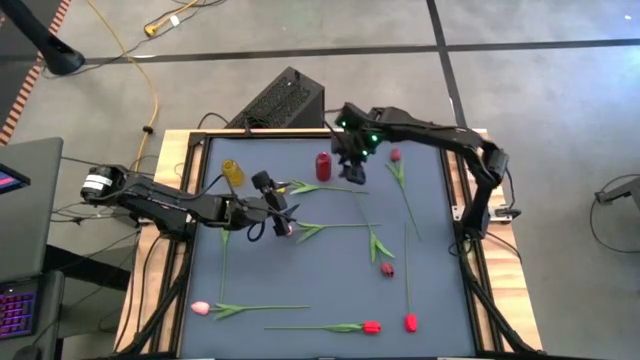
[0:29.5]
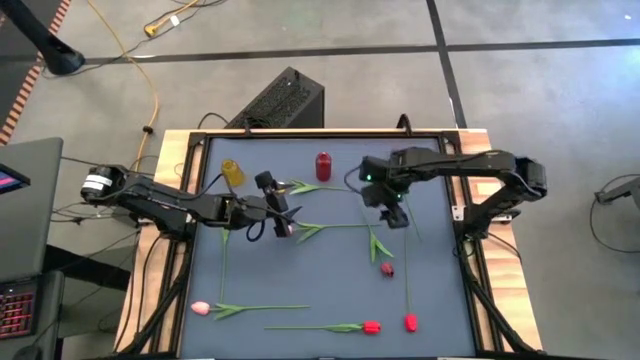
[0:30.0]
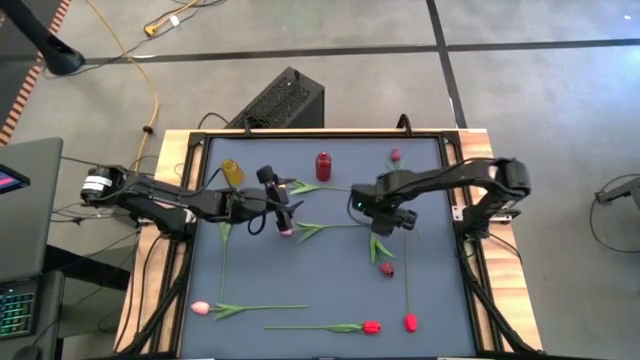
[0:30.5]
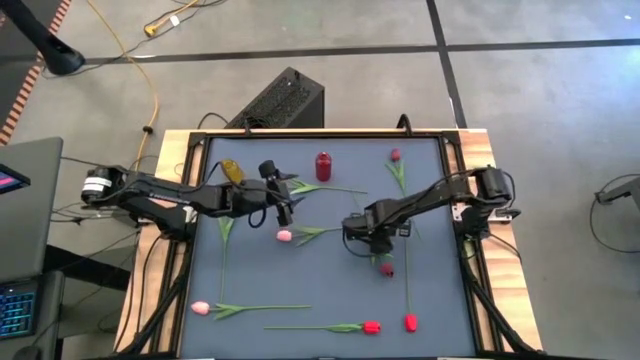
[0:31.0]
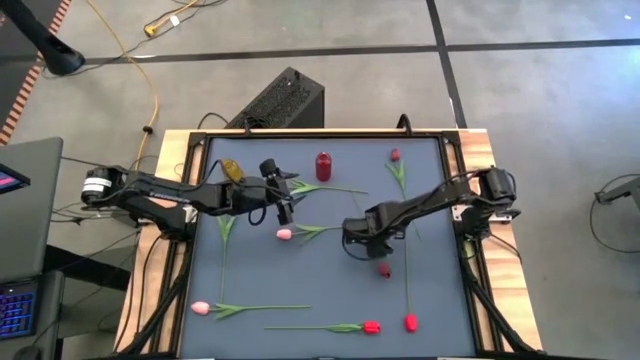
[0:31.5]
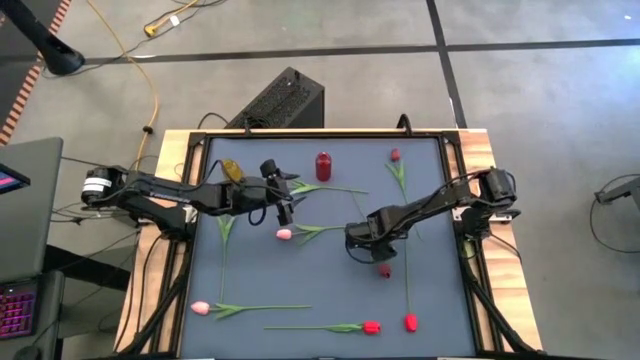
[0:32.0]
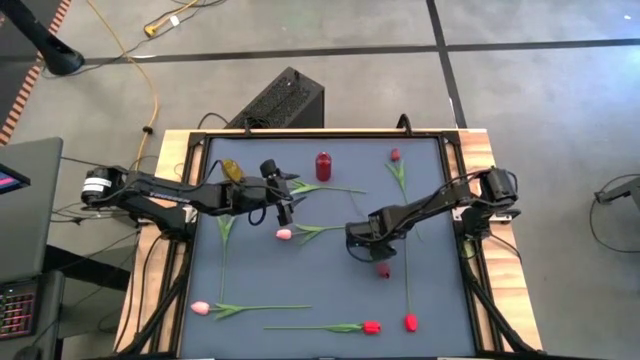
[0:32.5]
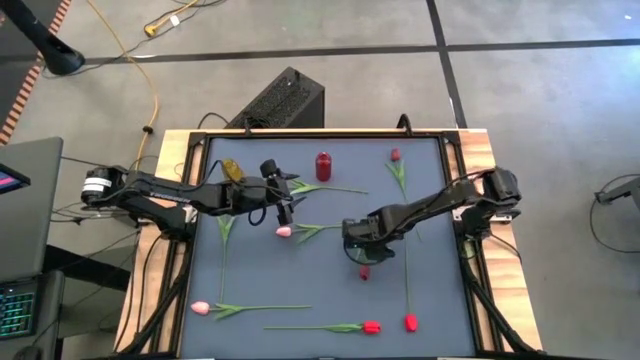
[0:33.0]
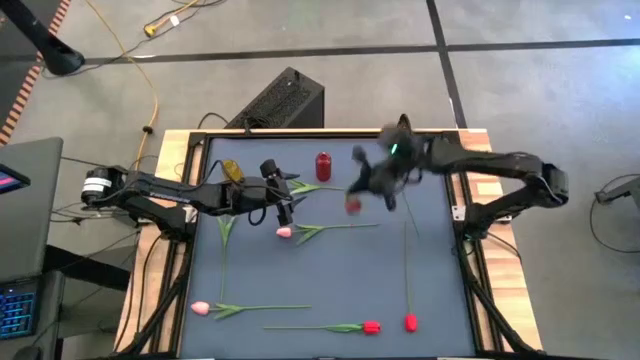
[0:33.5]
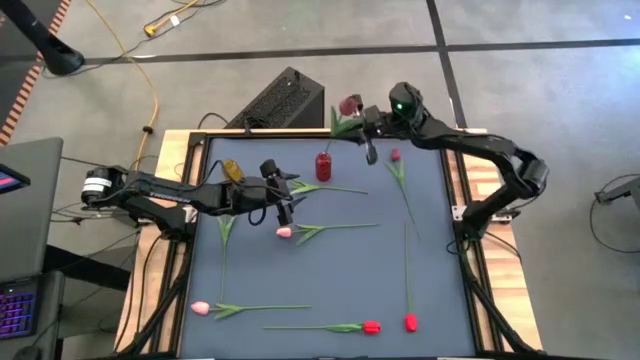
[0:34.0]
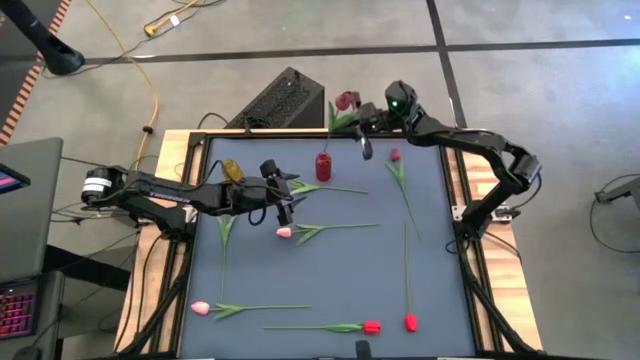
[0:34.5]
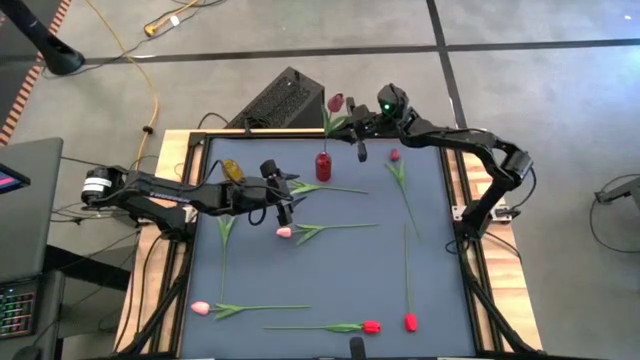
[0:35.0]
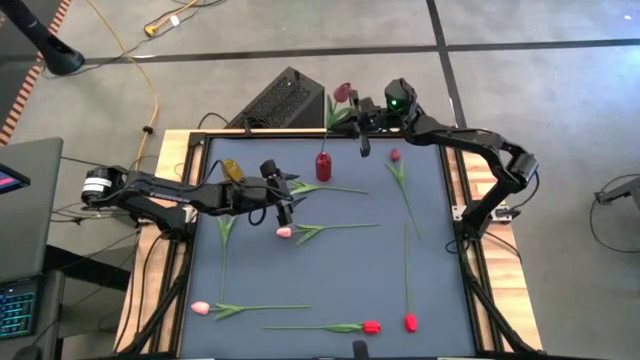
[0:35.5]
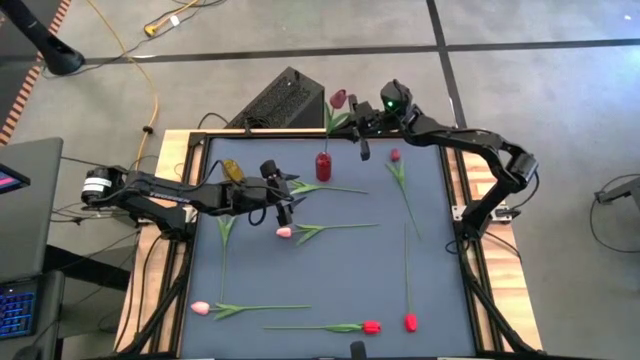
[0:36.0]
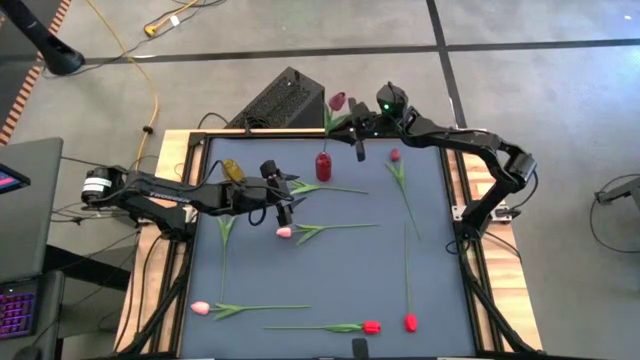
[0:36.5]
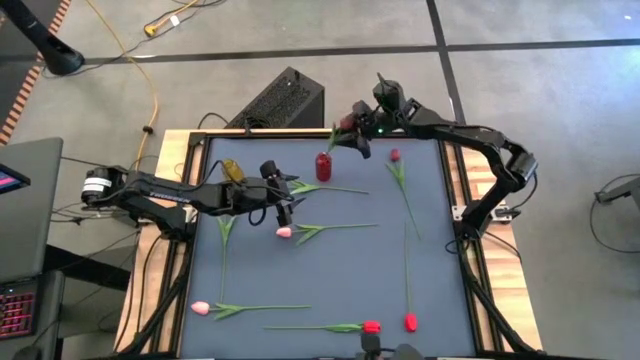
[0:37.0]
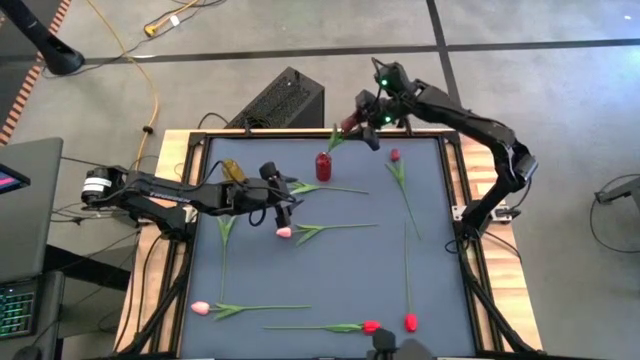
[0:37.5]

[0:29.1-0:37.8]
Task: Sort flowers into vase by color
Put the bottom dark red flower into the red flower vase

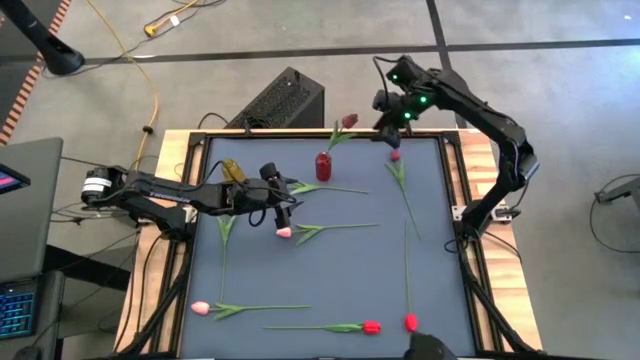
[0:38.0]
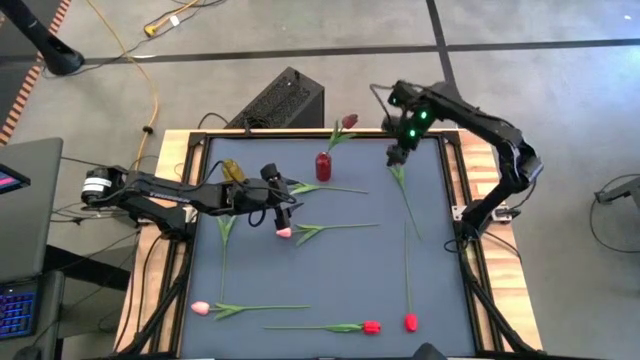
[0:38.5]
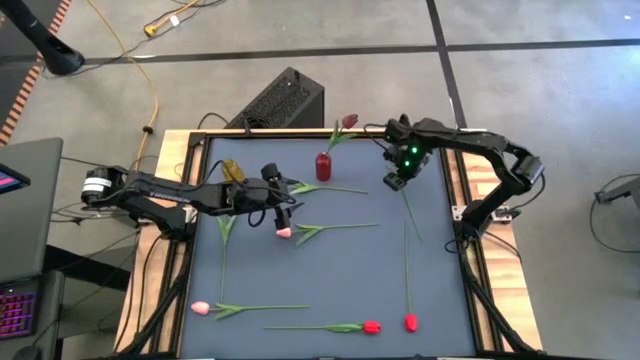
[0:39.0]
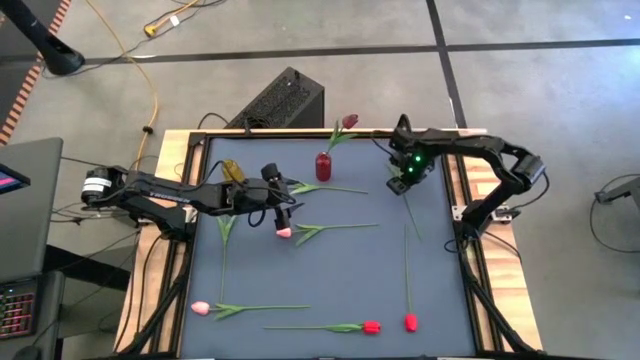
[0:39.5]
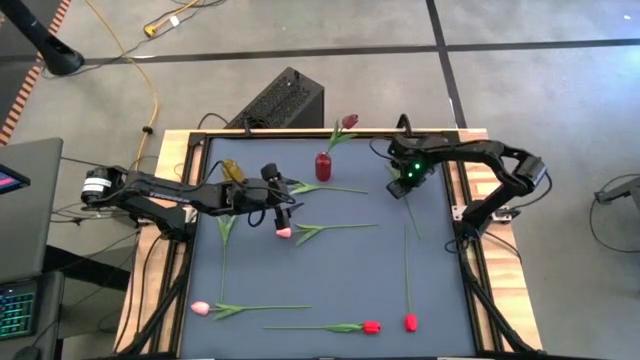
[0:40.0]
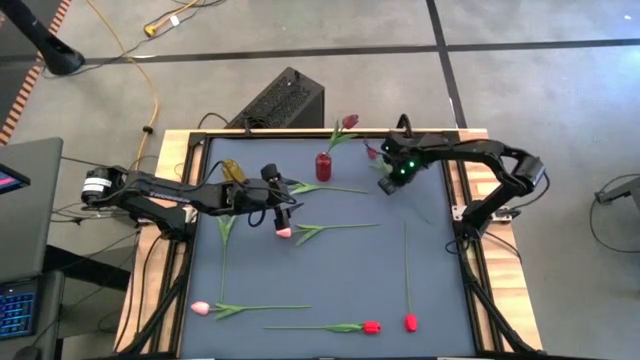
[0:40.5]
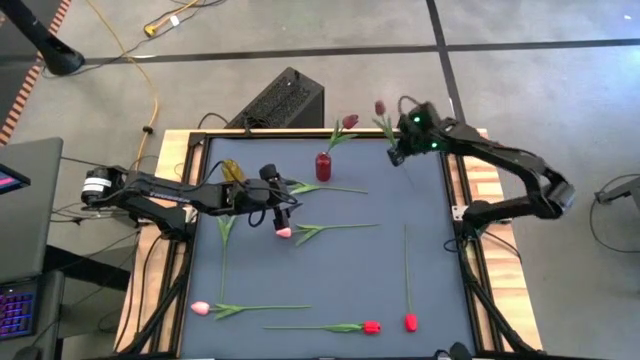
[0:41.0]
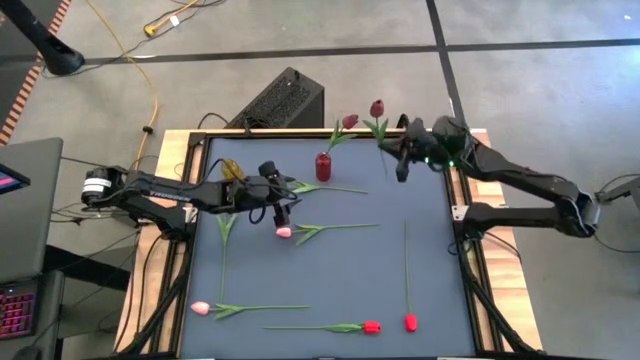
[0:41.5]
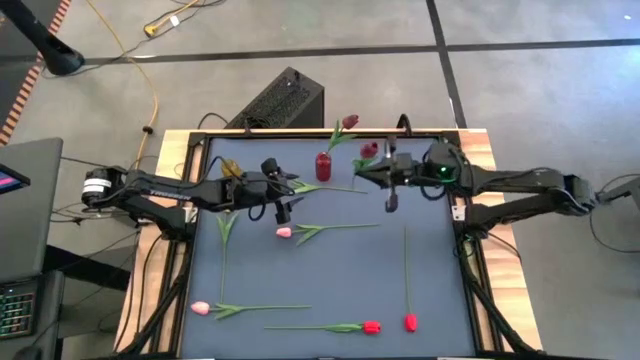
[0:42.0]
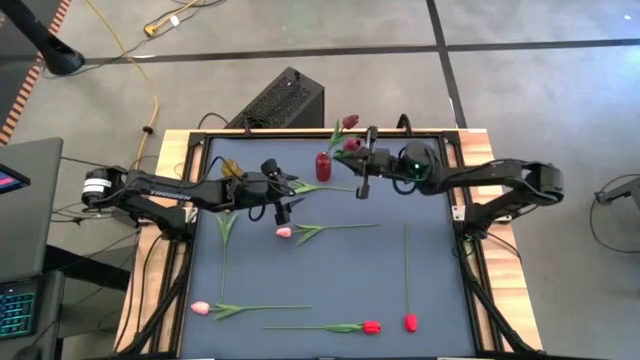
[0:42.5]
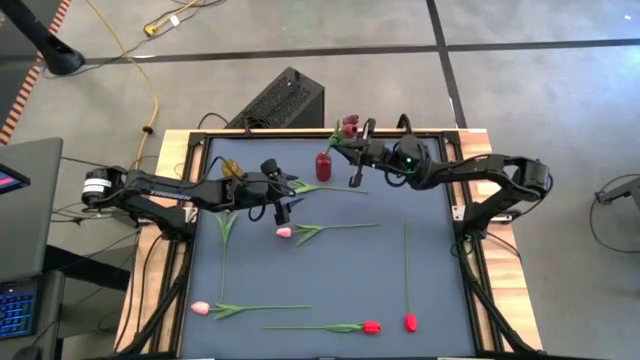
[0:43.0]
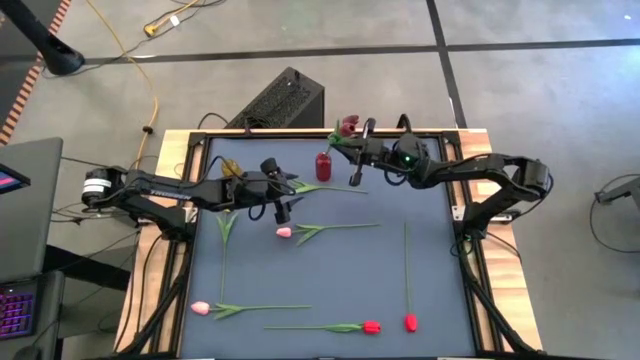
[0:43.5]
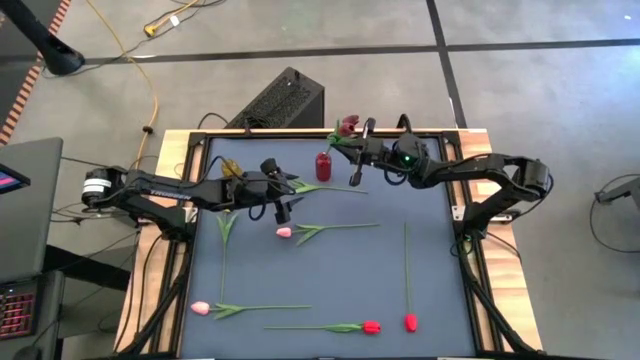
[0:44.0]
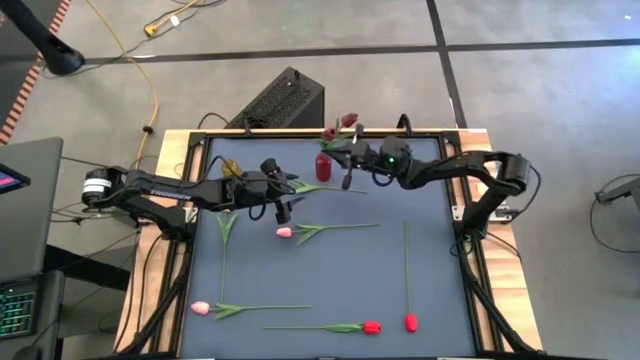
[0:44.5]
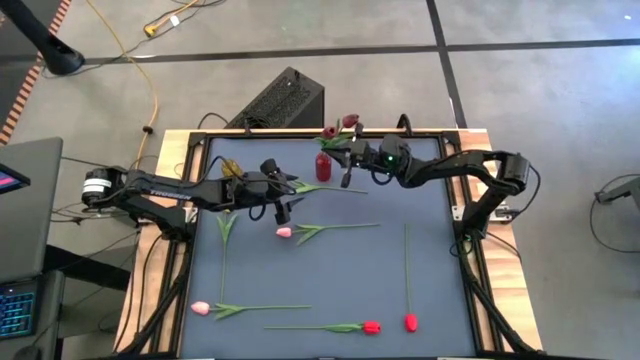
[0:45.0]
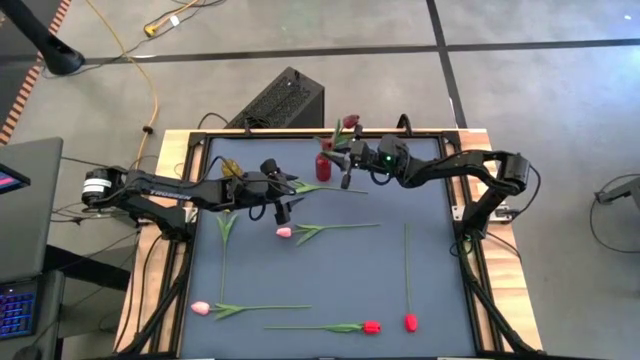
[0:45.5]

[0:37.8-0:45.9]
Put the dark red flower into the red flower vase

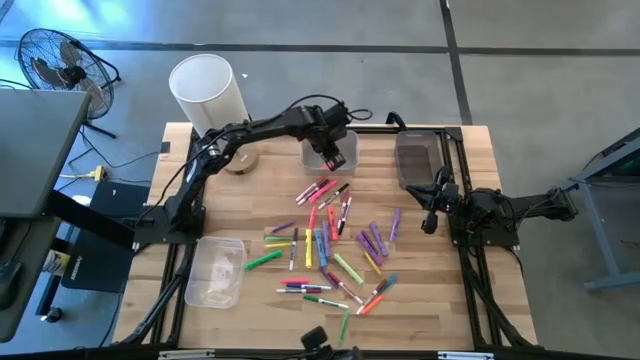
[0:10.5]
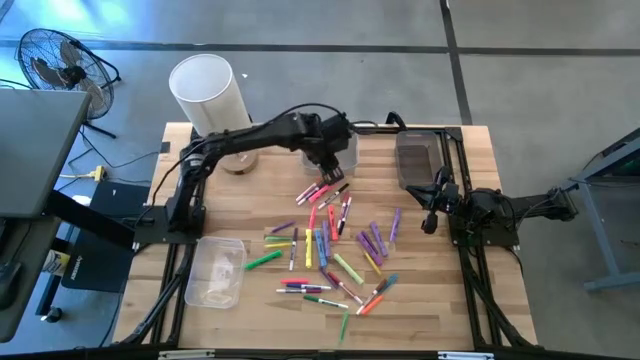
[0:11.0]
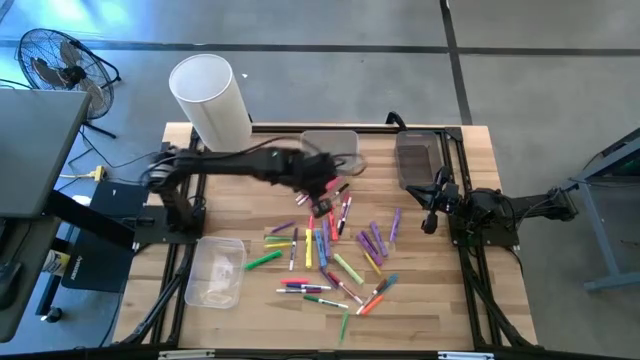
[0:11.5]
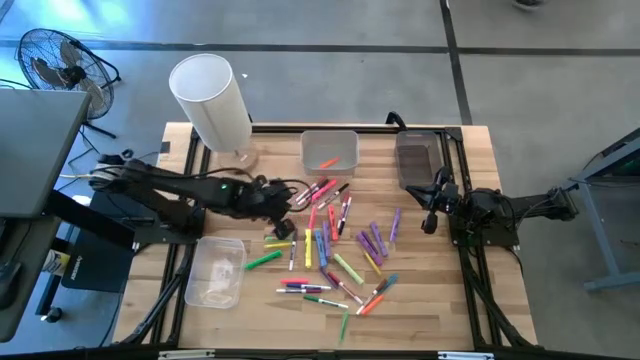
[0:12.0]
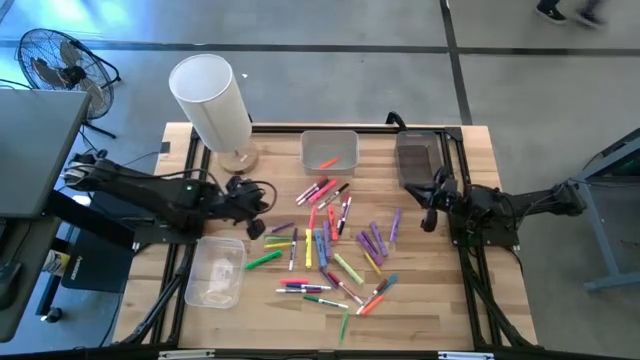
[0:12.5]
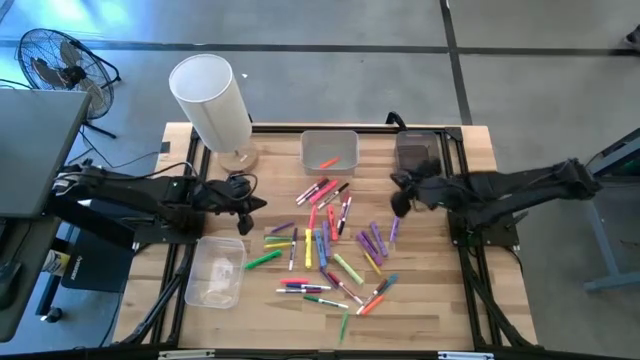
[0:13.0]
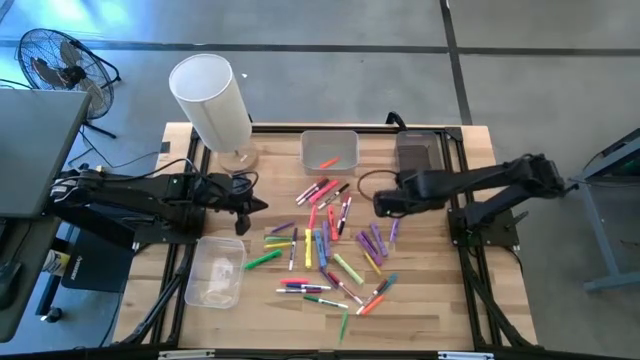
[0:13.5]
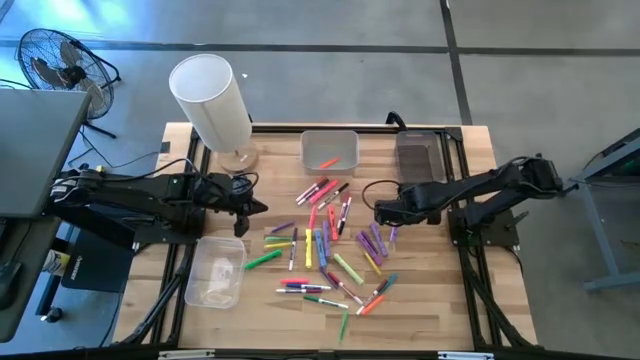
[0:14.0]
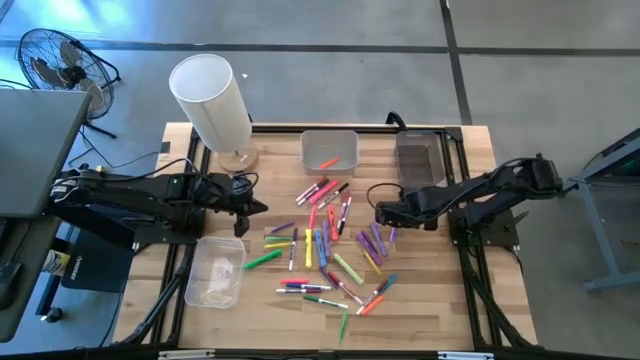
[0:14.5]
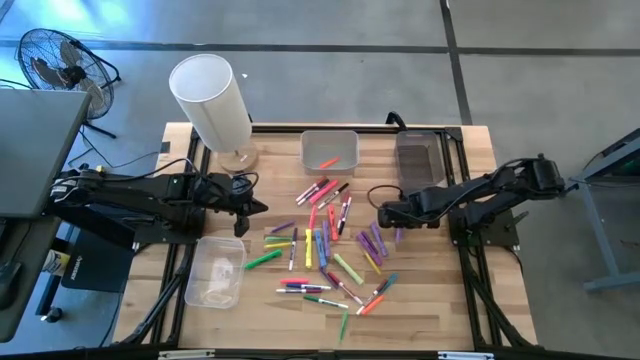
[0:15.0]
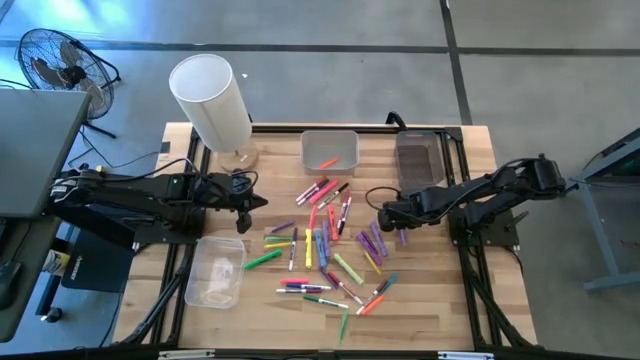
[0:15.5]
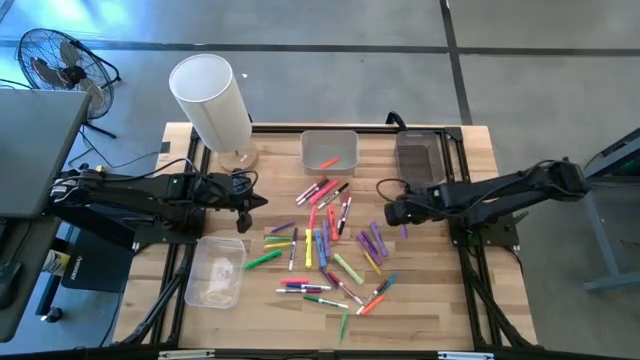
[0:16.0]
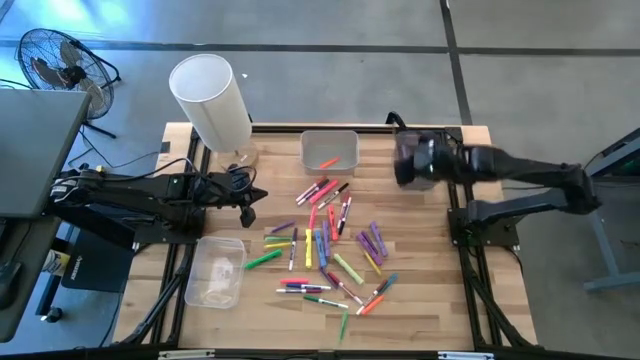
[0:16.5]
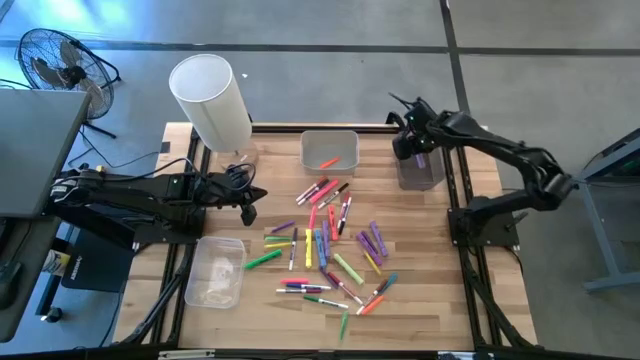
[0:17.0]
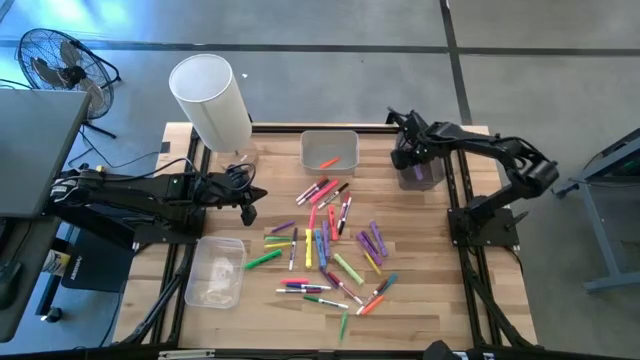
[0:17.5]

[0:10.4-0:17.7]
Task: Pick & Place Markers
Put the light blue highlighter pen into the black bin
